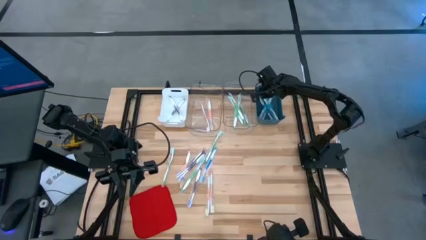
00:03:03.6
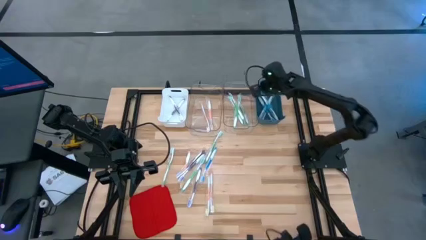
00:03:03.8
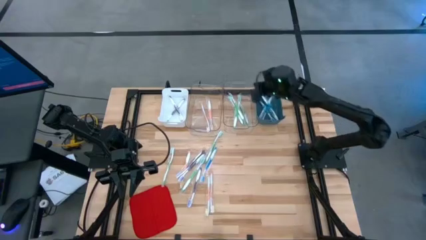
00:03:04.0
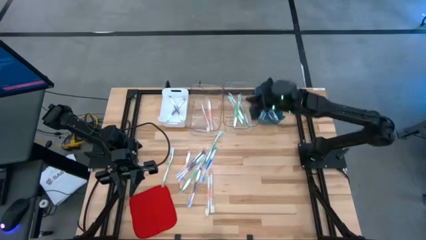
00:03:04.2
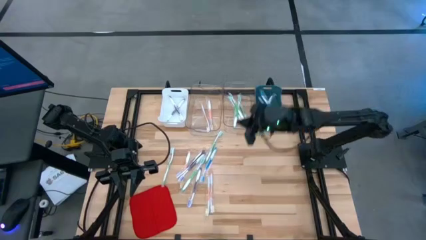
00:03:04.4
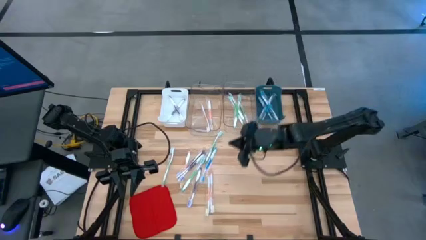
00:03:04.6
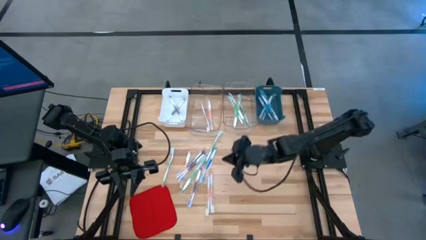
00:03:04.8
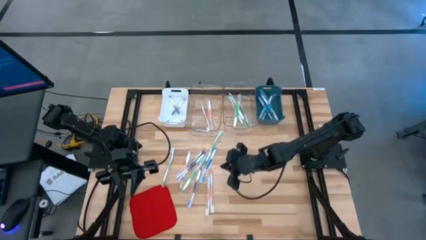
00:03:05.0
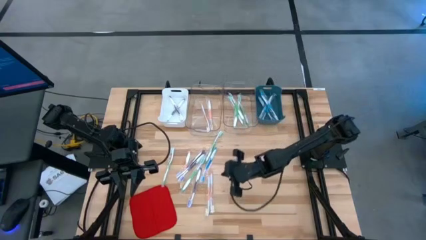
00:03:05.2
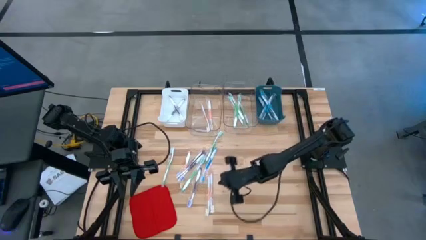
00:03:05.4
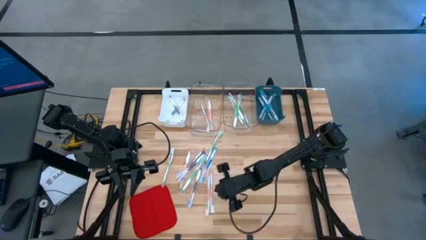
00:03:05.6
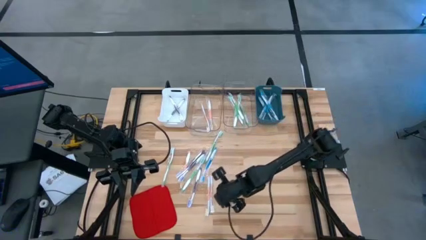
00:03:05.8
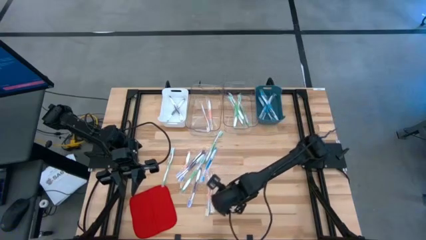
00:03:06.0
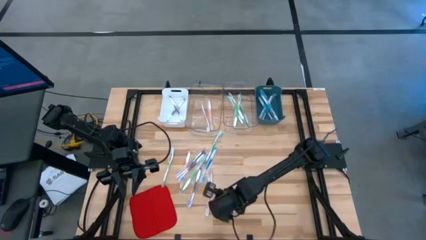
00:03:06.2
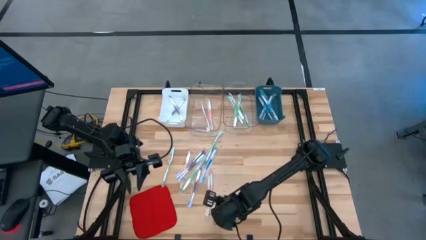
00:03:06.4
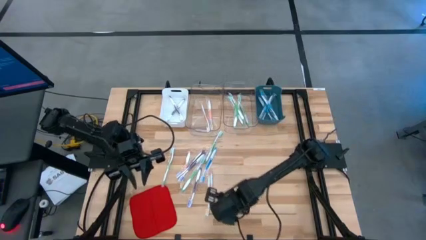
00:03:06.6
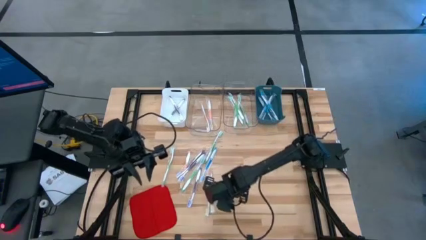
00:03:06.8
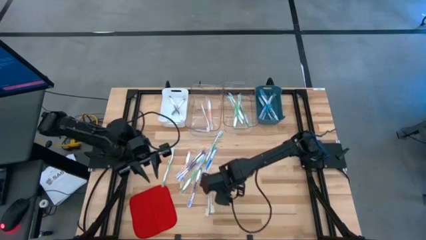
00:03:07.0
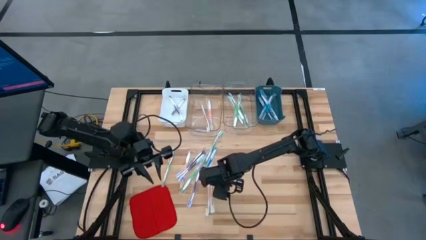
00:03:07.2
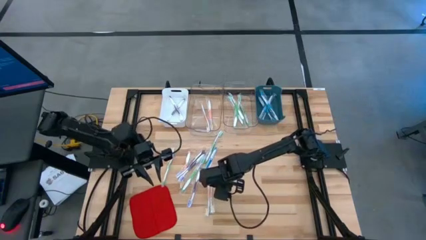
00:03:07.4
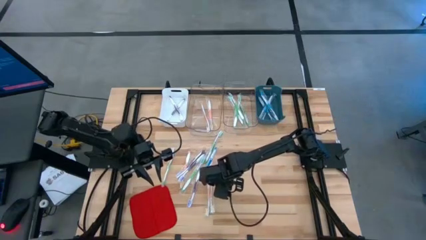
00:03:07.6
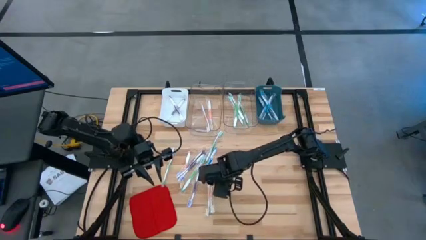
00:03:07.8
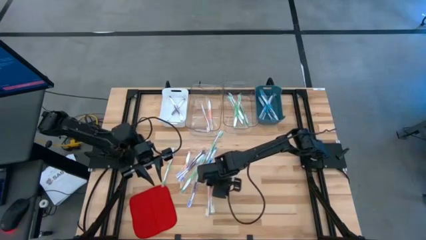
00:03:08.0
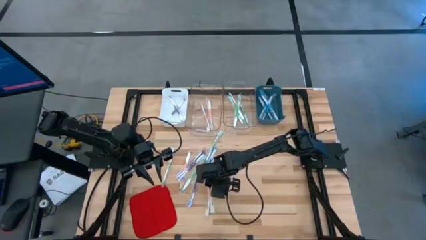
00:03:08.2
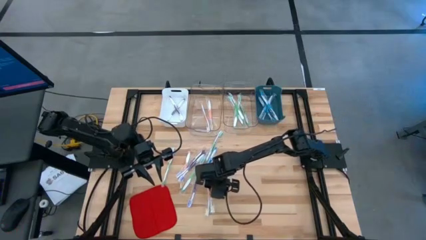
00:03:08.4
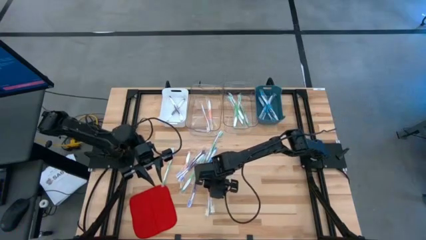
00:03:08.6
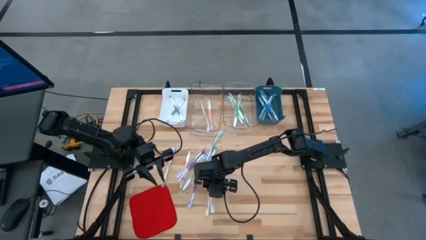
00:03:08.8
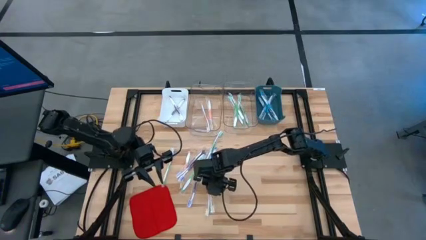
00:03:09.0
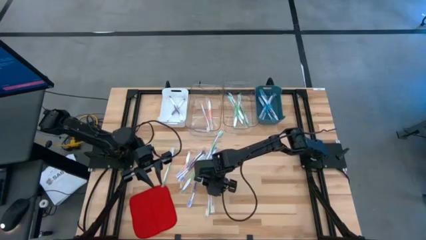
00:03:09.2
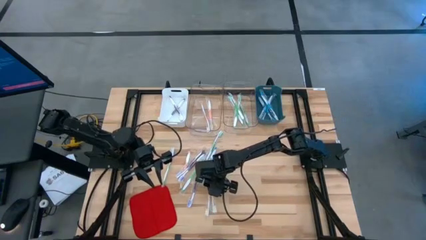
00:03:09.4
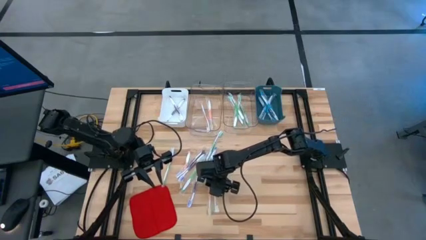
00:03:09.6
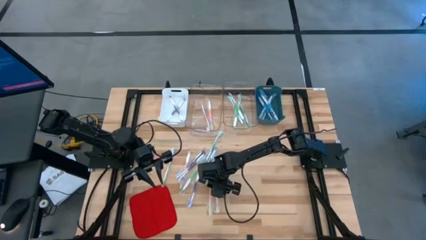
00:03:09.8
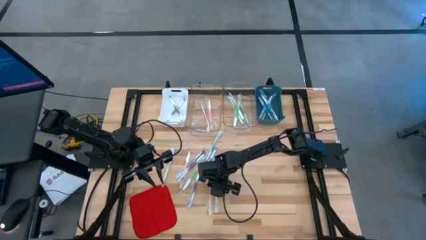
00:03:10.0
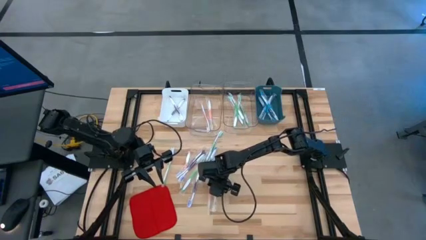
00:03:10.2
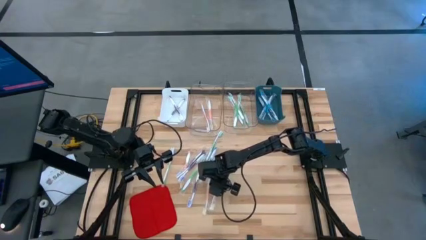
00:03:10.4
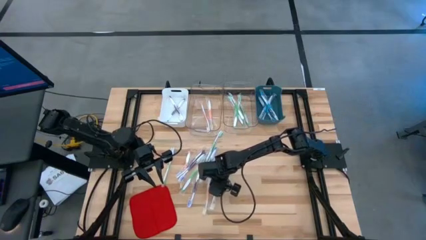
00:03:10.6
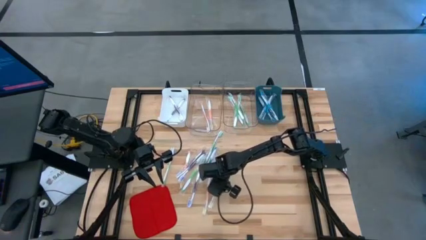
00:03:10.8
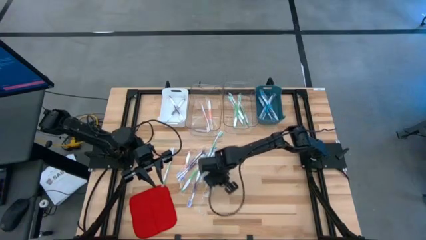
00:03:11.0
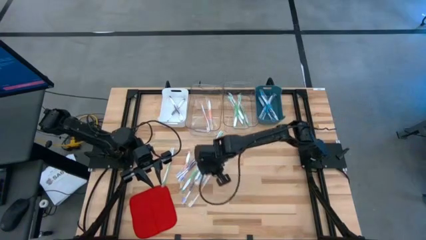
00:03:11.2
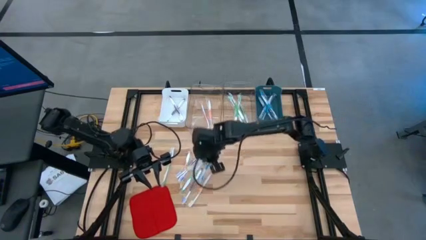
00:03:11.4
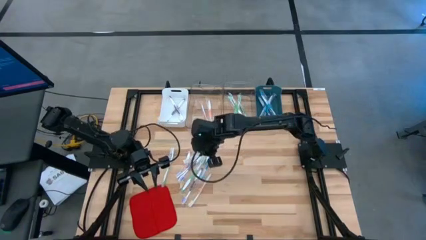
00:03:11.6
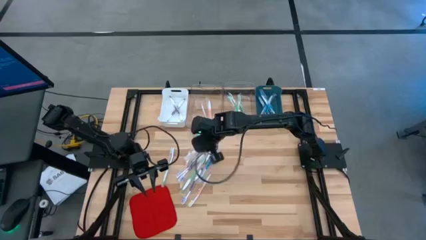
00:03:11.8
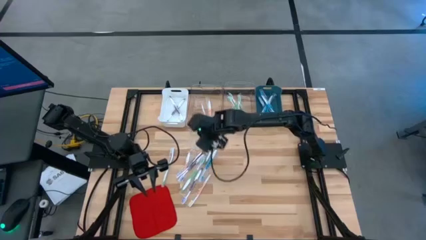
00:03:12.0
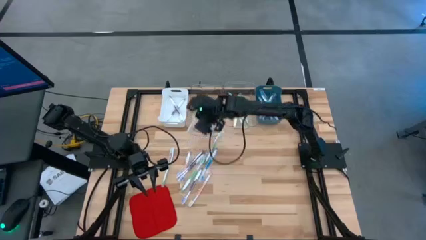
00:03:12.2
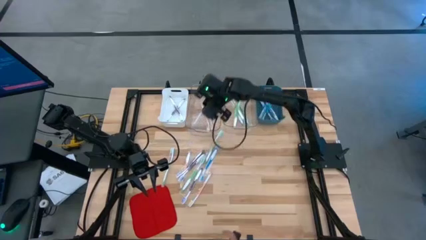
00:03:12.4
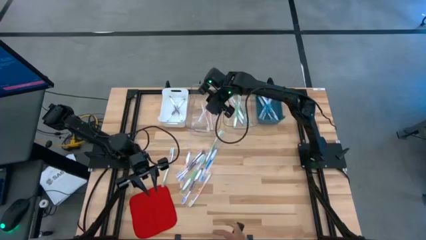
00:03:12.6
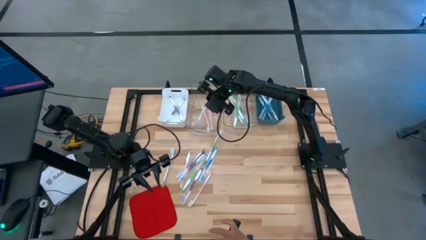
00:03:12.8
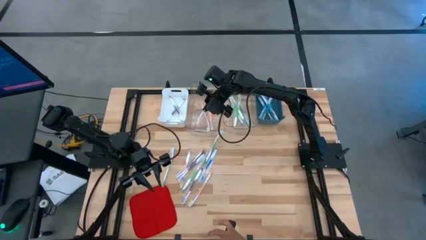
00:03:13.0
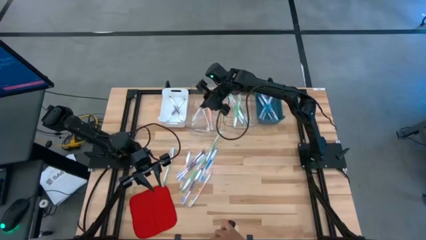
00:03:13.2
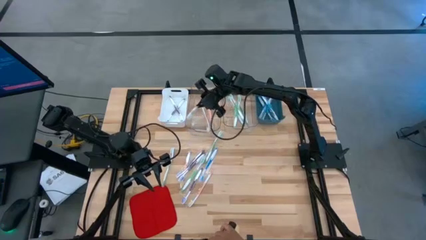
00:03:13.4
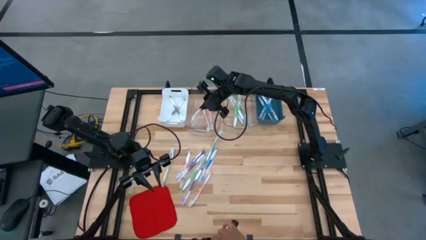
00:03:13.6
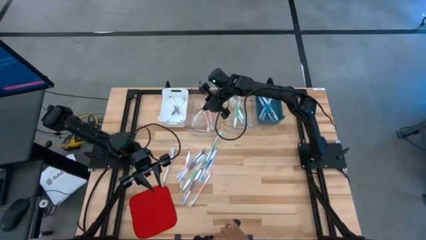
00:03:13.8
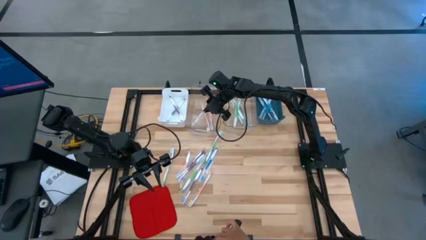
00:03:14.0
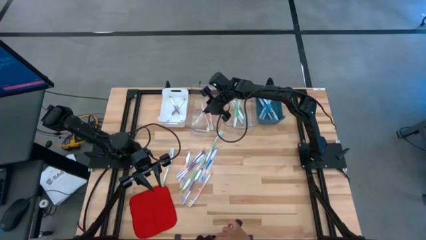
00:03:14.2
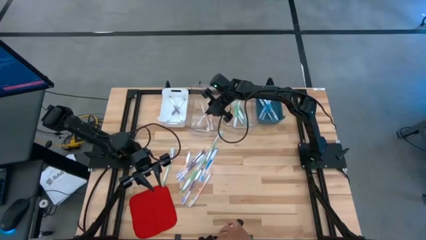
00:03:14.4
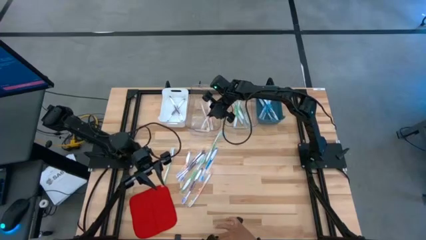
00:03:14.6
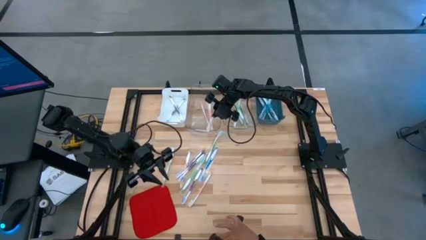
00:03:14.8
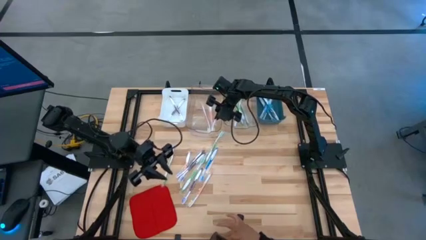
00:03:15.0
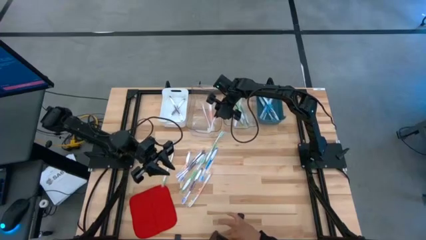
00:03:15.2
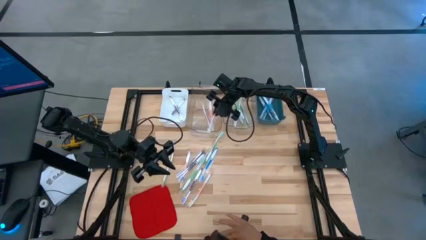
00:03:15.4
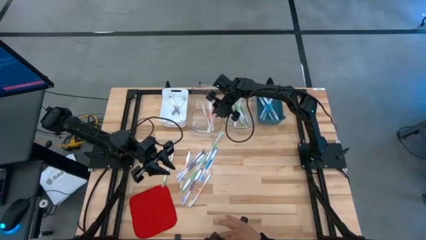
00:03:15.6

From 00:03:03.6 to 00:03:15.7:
Task: Pick & Place Toothbrushes
Put the orange toothbrush into the left transparent bin

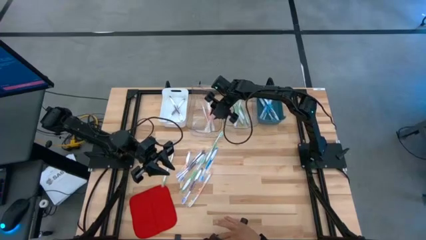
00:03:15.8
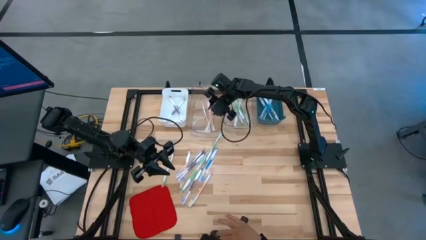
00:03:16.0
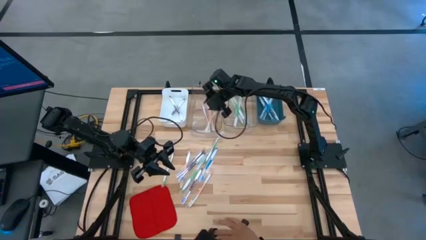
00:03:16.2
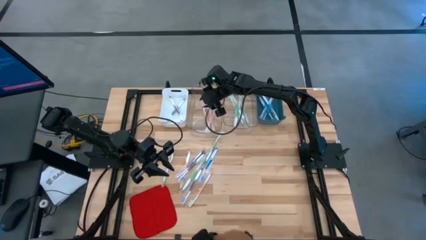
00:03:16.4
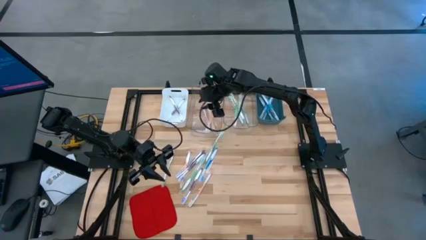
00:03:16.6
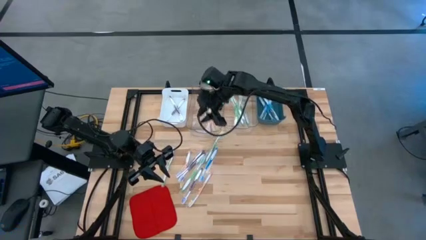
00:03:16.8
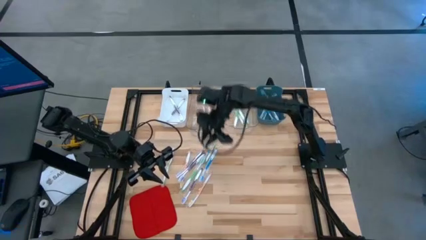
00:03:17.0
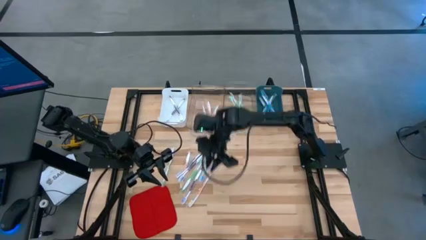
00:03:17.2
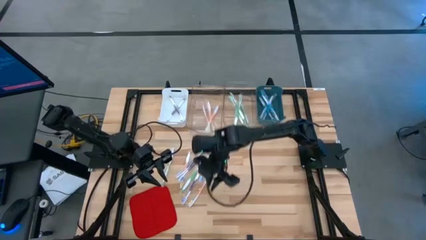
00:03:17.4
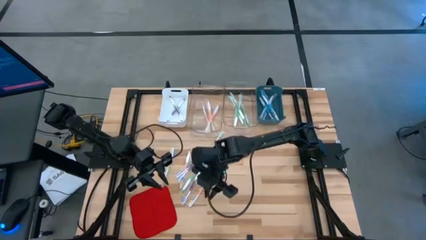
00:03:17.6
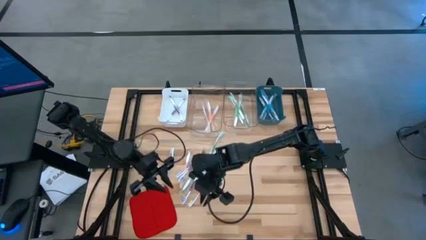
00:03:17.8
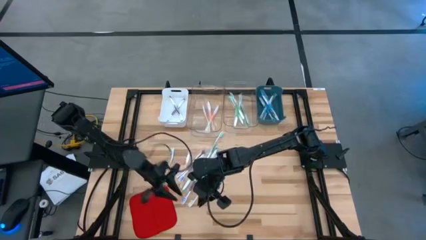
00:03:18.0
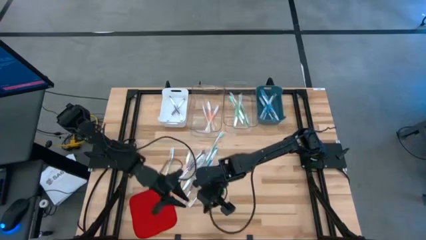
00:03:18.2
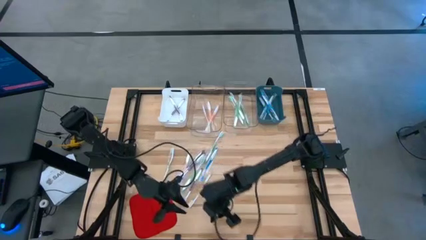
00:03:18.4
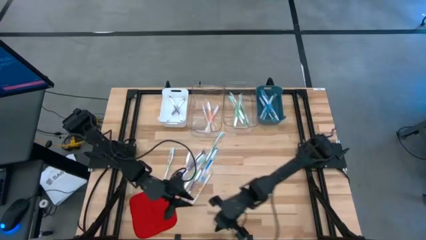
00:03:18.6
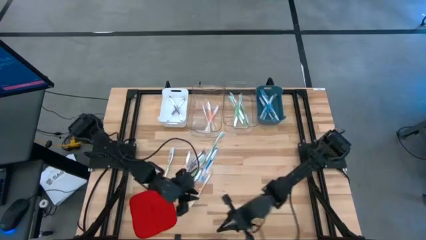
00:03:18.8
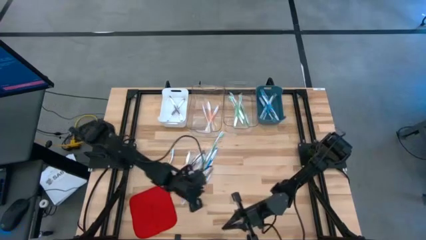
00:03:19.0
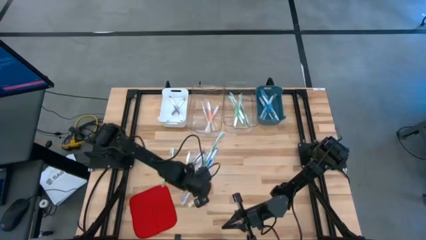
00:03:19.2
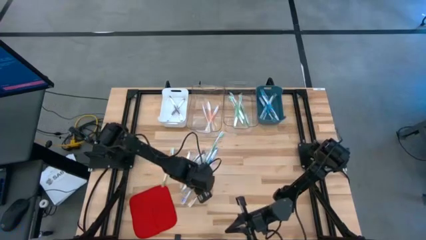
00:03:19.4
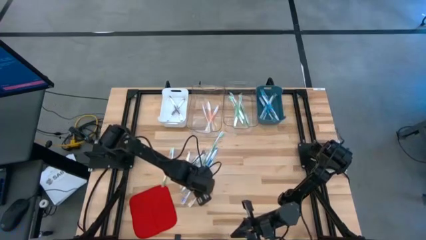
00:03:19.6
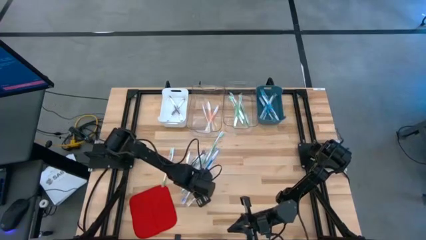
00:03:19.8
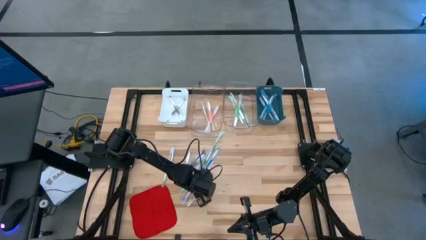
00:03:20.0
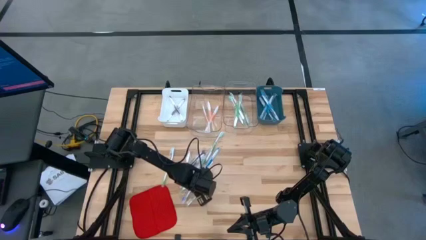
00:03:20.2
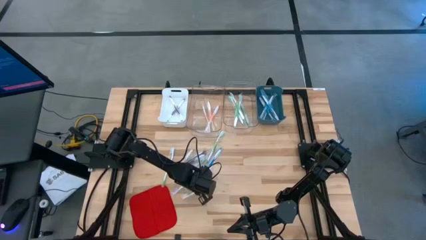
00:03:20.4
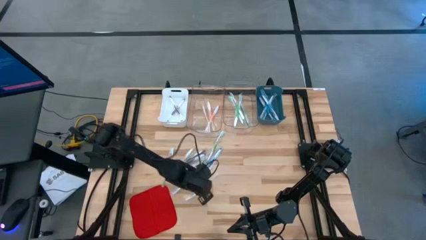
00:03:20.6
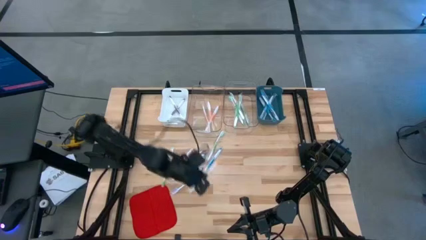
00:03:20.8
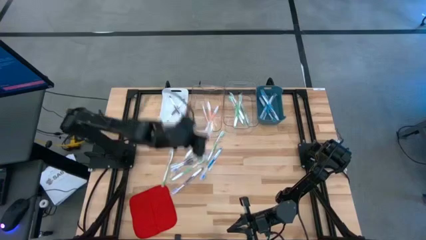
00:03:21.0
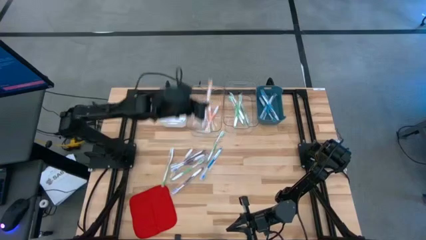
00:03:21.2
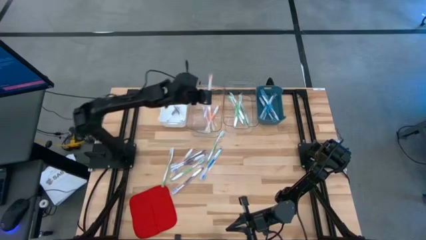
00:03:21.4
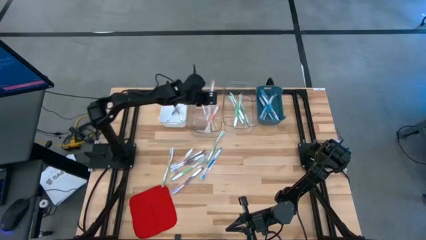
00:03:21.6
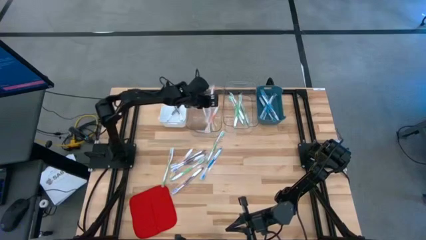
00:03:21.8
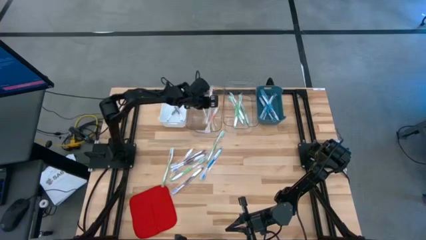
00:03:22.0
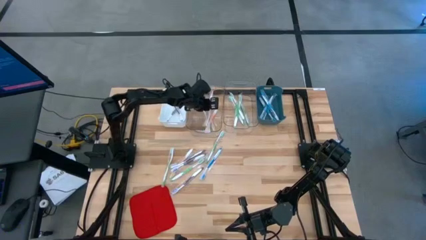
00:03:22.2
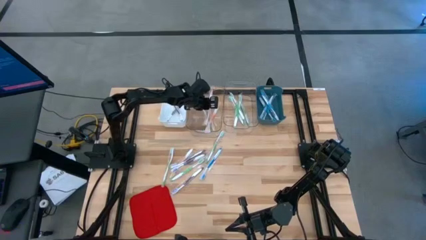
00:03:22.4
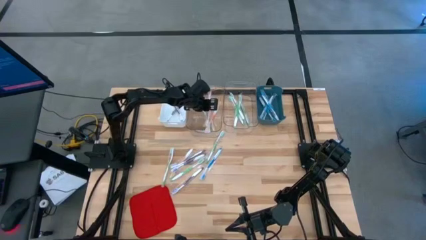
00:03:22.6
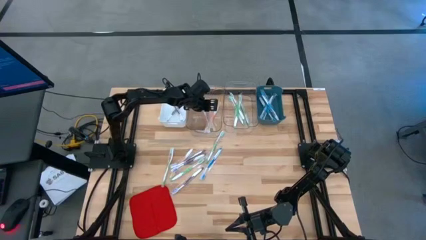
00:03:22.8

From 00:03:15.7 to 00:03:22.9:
Put the orange toothbrush into the left transparent bin
